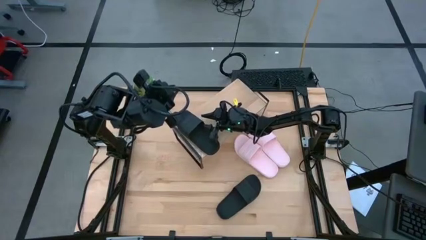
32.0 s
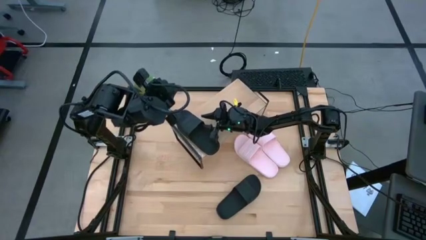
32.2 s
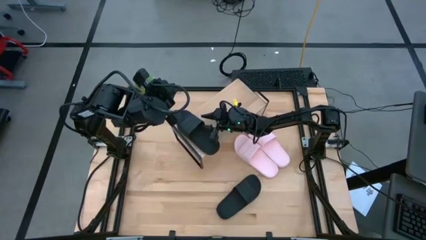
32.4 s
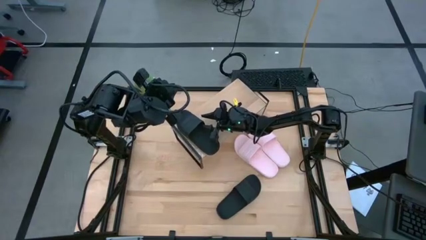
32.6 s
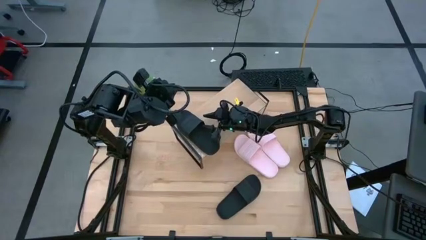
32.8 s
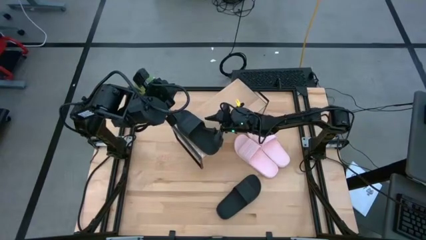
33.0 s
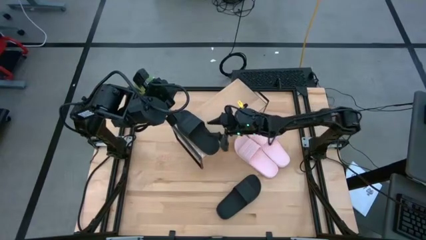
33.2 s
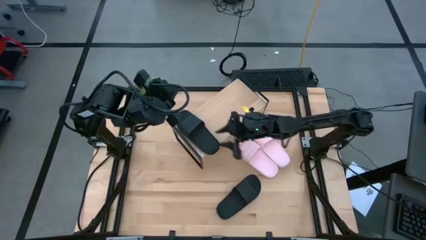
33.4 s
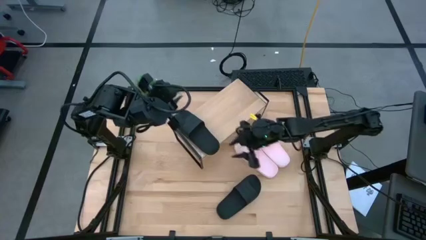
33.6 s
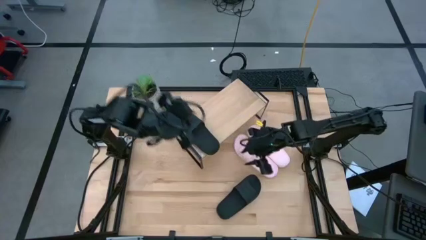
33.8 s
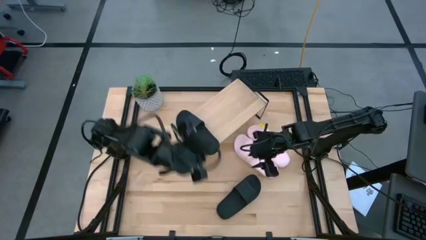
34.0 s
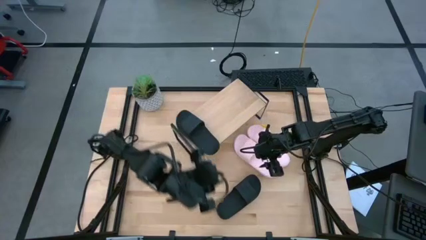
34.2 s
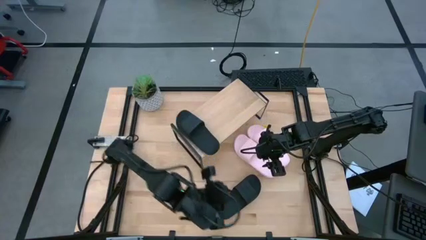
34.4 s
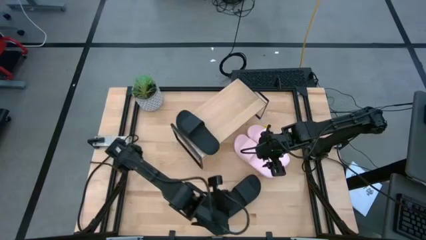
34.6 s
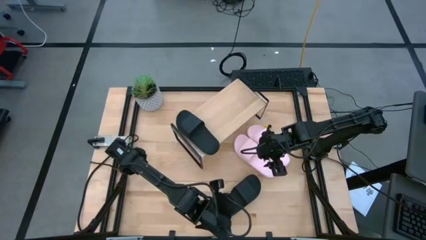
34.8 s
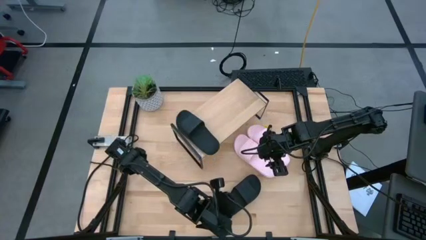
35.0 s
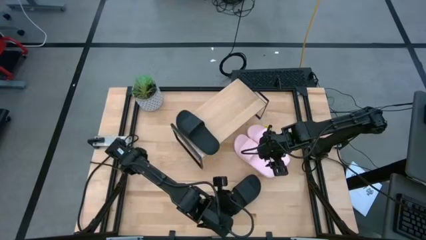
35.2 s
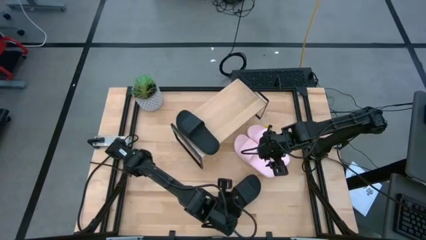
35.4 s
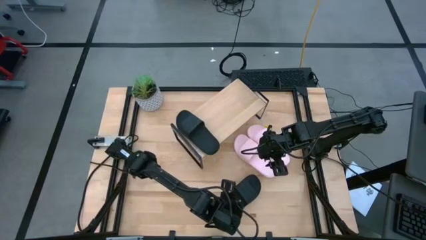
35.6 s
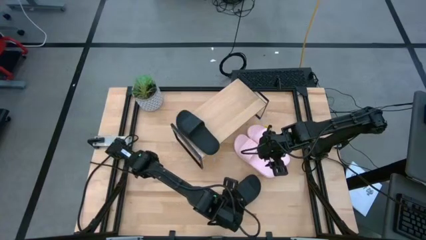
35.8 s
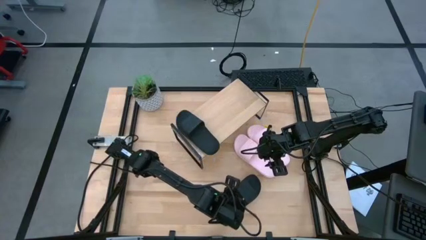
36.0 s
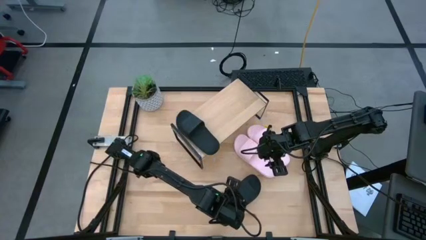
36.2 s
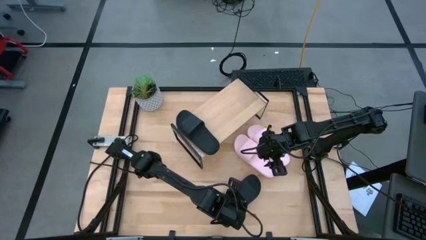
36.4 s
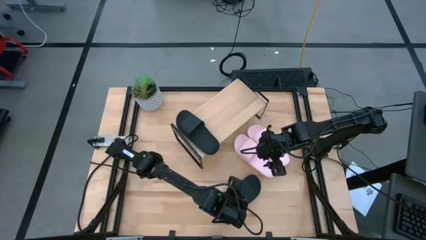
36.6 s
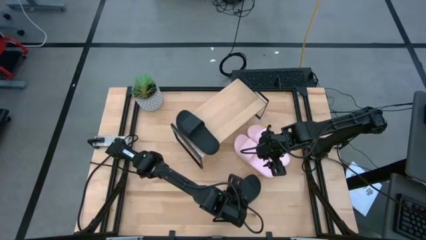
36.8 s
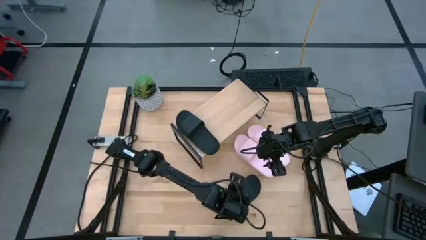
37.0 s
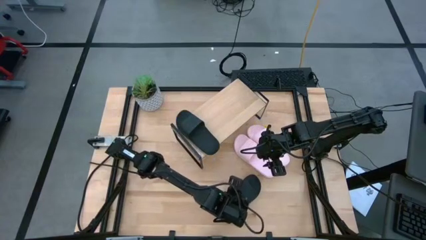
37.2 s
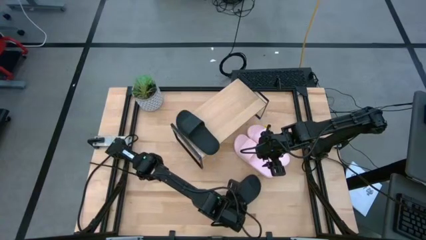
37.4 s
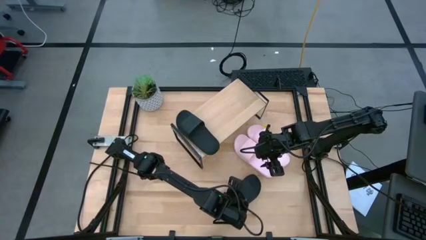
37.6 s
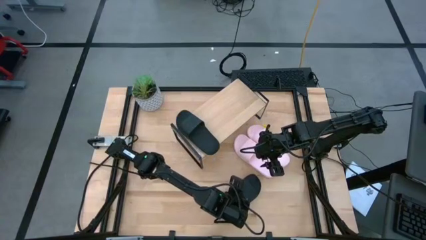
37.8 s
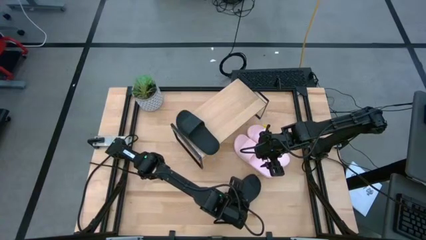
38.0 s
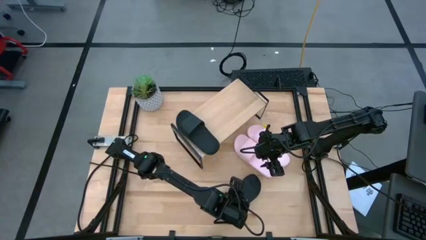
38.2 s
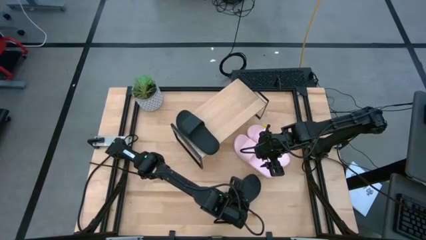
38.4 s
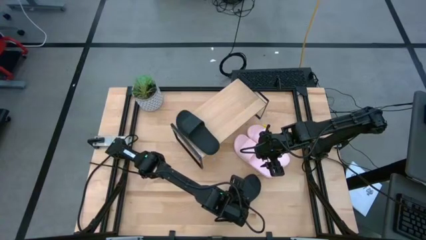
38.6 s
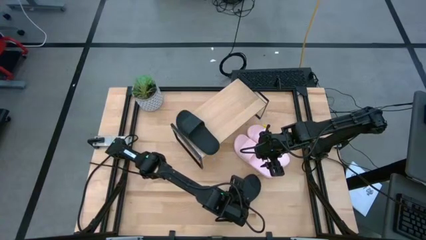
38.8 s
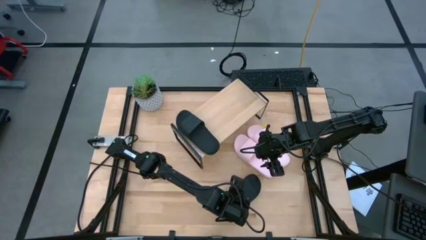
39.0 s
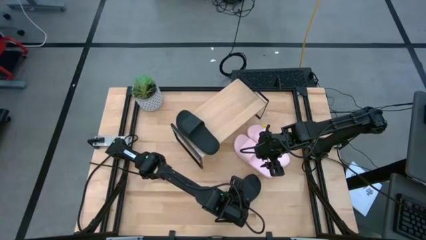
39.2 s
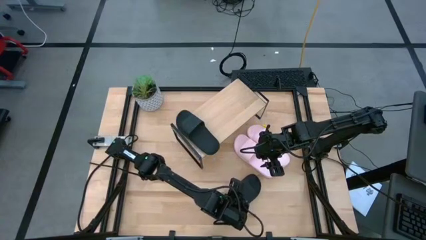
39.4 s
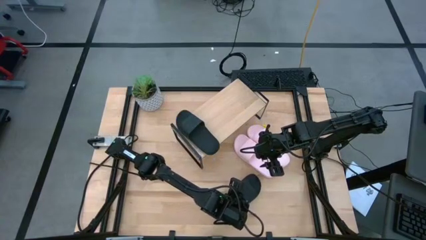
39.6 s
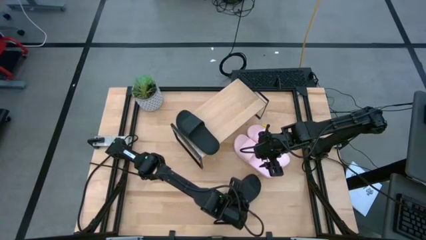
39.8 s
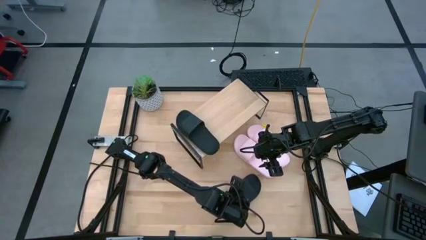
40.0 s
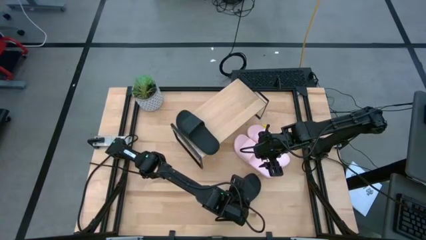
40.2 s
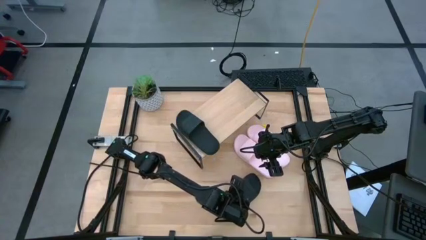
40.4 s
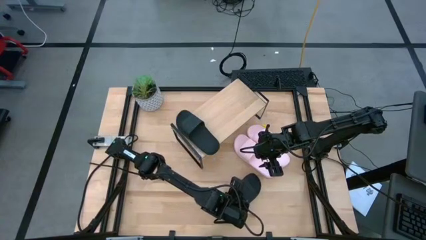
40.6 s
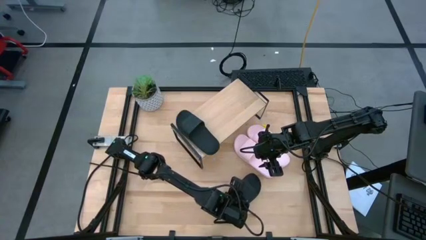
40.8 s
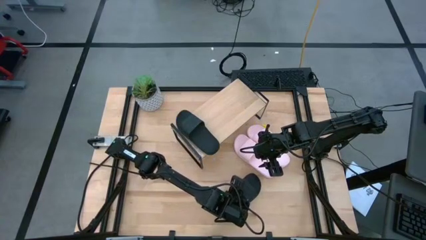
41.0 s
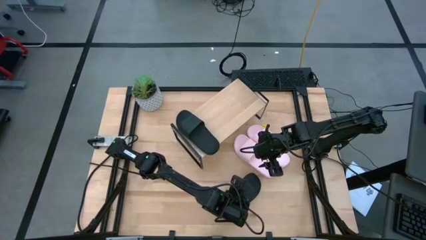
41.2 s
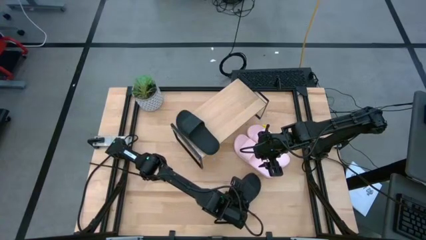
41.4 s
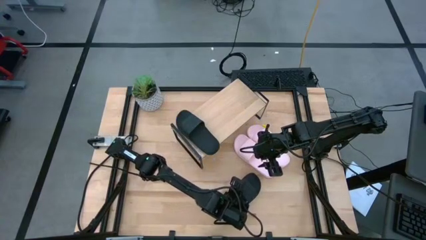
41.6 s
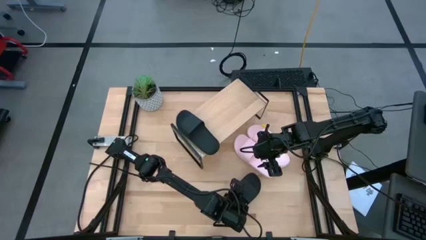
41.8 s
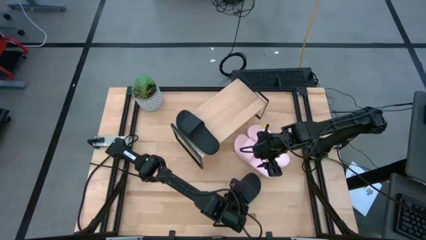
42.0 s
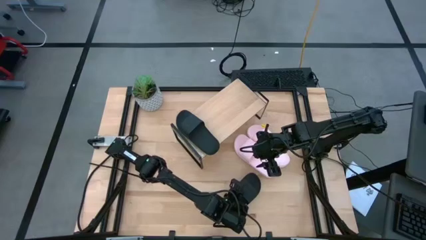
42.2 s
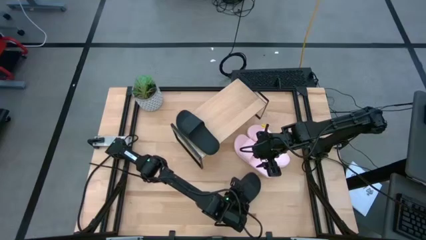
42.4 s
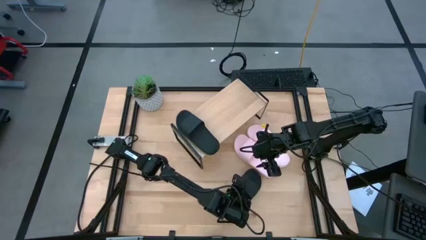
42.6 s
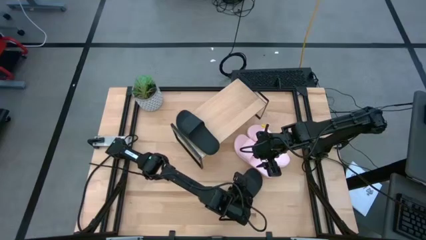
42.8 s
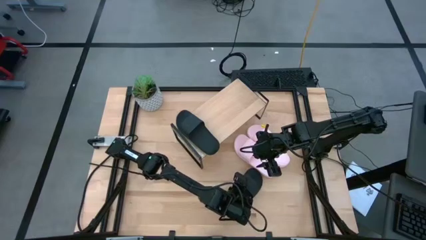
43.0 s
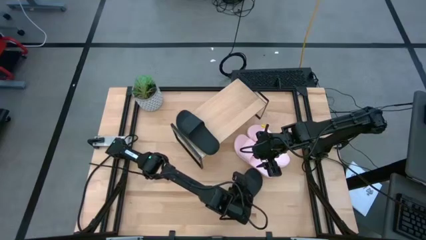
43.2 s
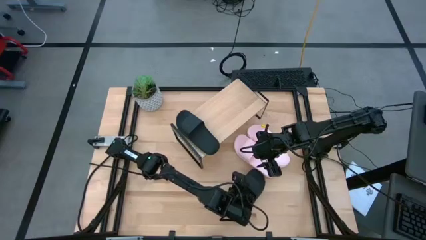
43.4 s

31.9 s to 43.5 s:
Task: Pick and place slides into the shelf
Put the black slide on the shelf
